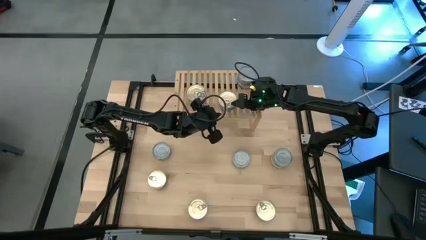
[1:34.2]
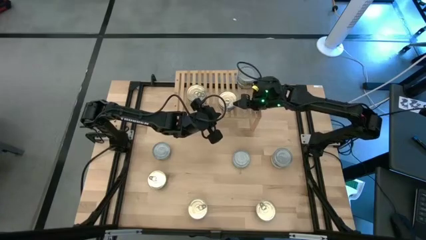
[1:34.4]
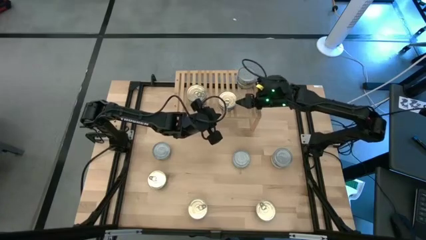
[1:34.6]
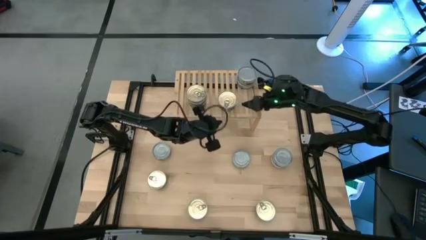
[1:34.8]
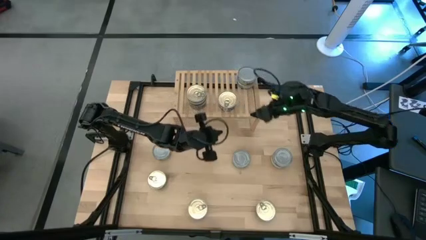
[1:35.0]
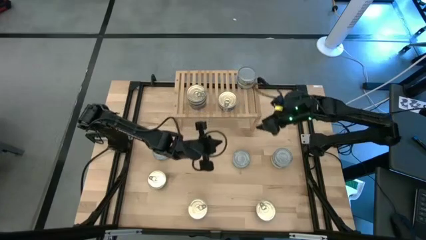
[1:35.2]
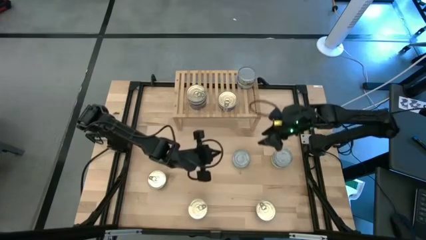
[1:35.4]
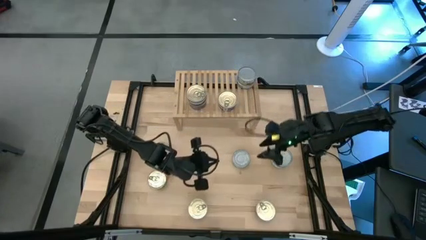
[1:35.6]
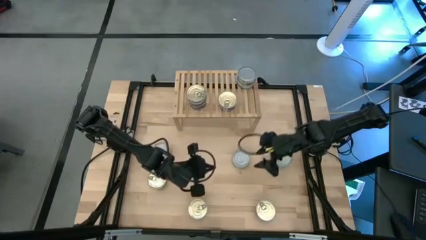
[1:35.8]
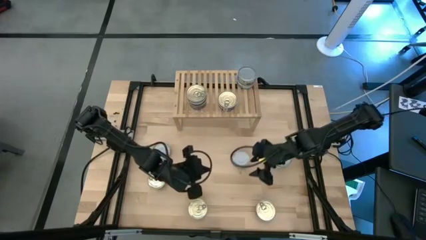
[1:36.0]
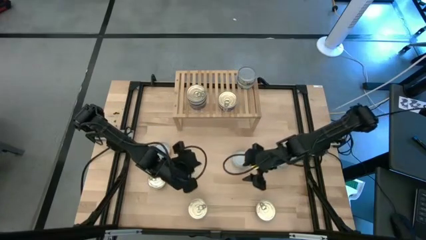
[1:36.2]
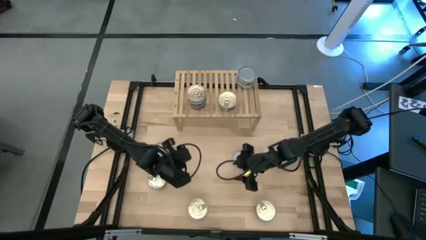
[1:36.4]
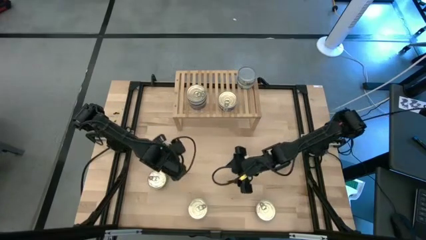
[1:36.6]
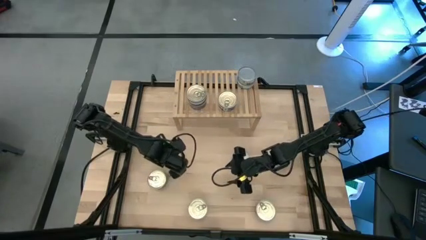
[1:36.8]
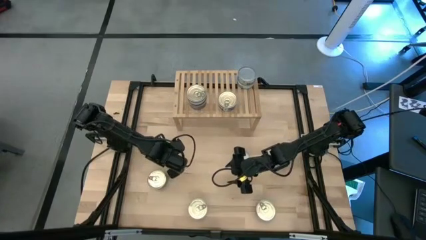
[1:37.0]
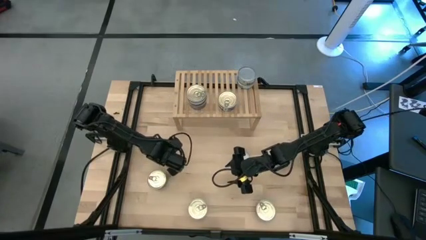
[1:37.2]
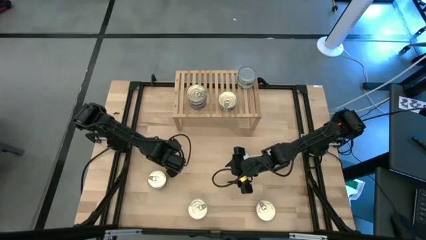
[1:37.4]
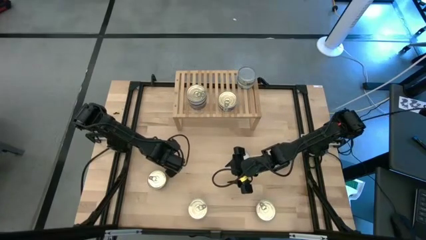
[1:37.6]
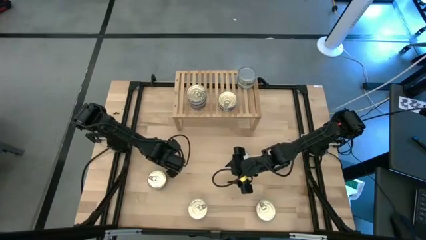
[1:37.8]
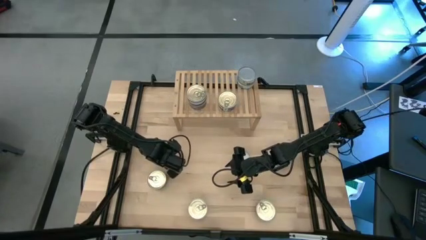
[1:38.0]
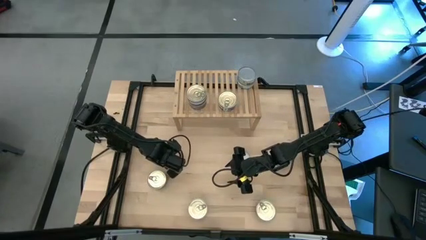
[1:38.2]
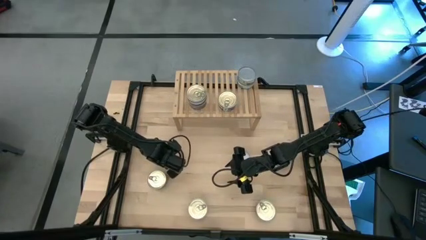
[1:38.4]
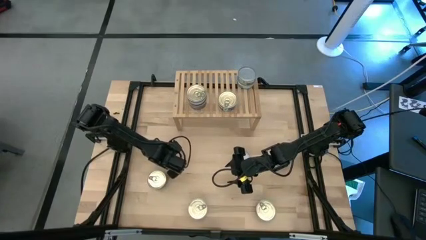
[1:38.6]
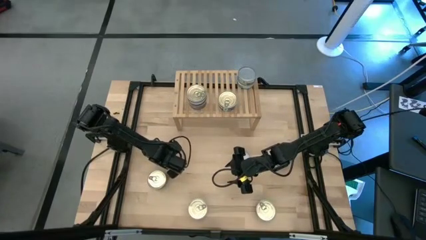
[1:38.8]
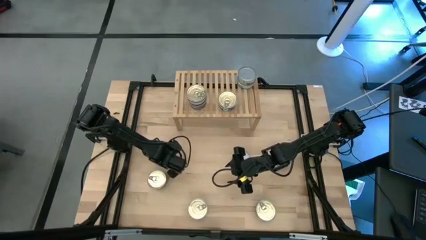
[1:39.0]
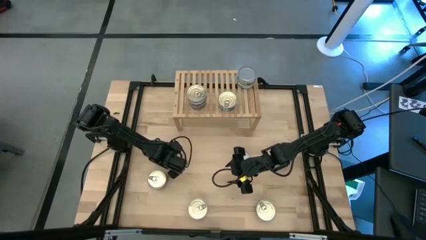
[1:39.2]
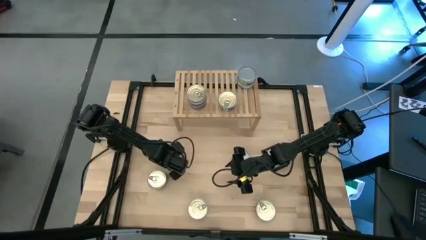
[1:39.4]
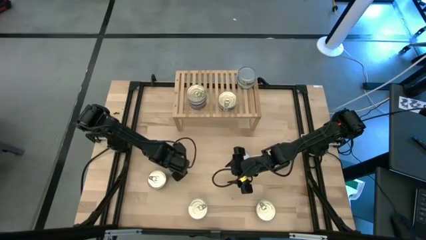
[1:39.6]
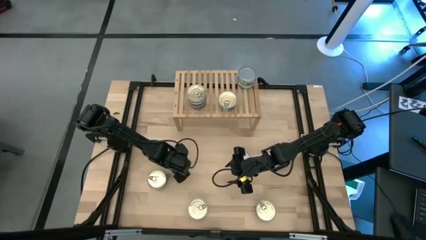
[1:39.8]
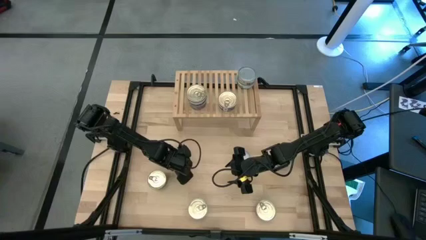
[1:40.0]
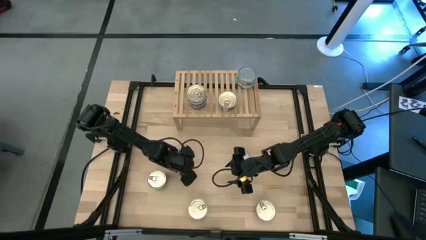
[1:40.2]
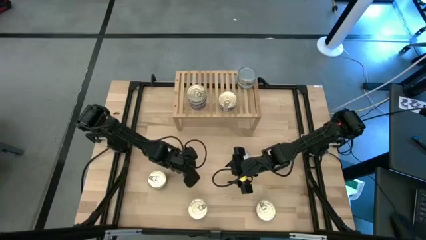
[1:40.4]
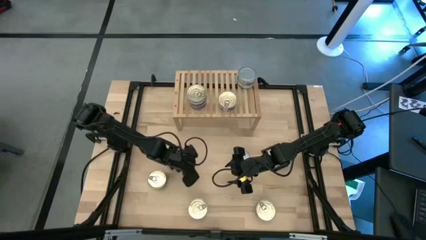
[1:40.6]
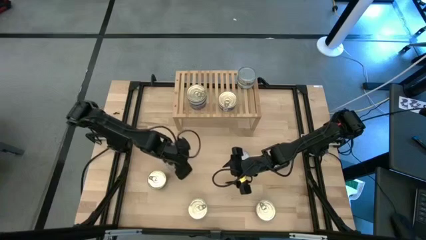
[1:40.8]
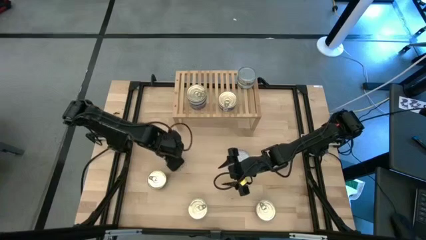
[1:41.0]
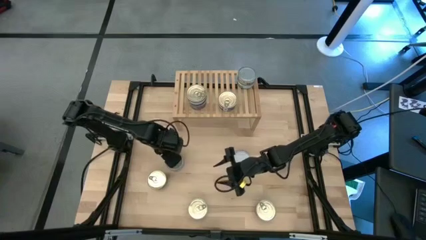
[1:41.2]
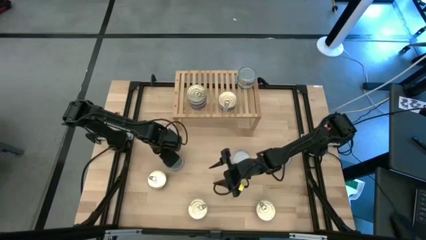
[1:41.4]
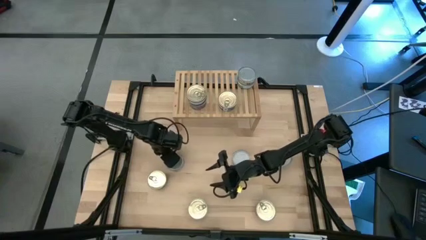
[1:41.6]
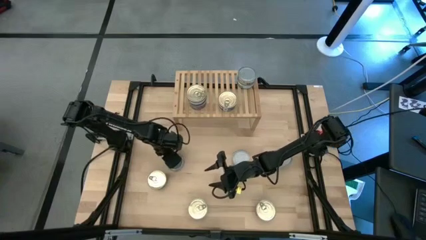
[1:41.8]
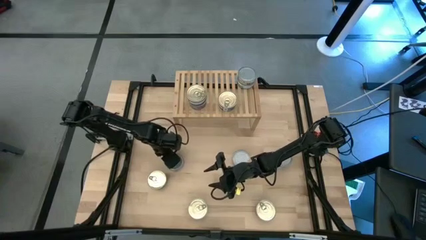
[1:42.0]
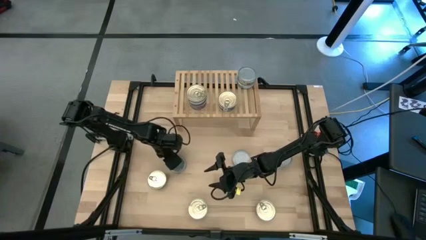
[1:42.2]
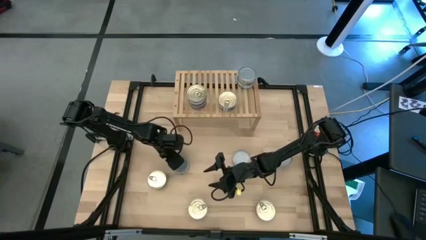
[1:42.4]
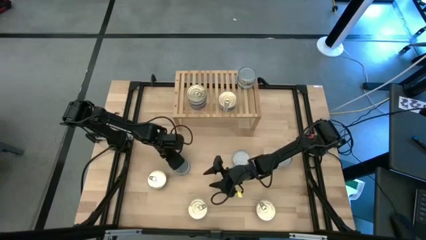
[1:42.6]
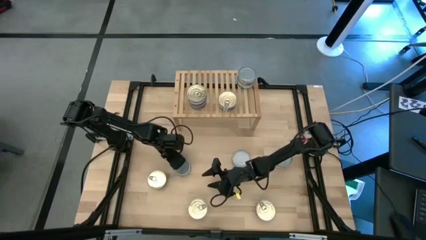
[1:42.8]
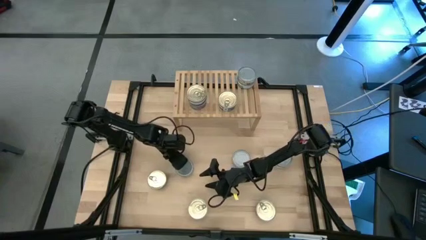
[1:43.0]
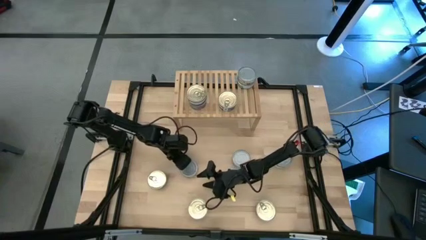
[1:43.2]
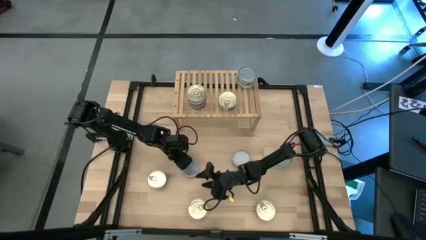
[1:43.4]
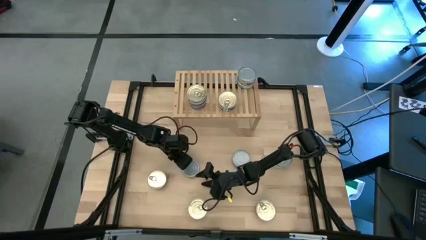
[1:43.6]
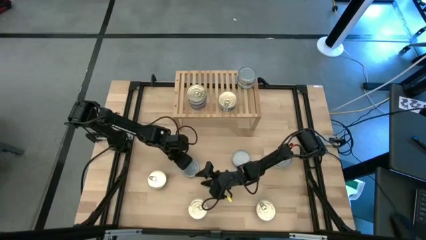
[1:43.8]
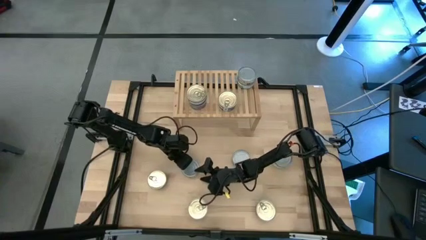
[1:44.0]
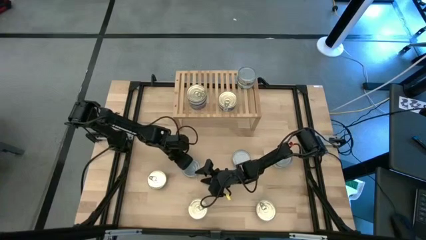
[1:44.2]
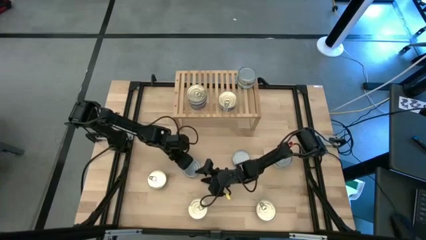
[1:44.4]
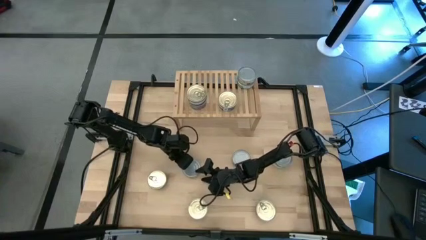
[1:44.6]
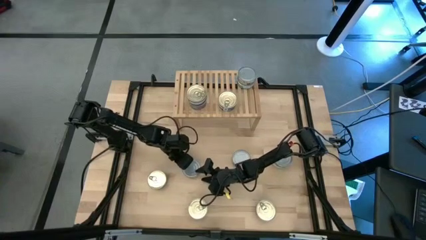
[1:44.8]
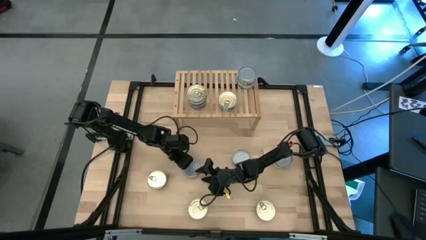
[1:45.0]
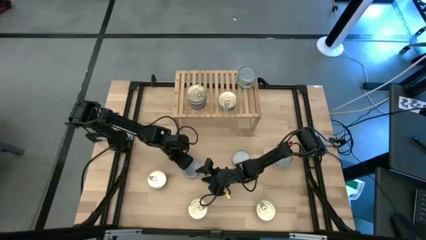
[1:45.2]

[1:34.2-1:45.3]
Task: Stack canned seafood by type on shelf
Stack the green tuna can on top of the green tuna can on the shelf

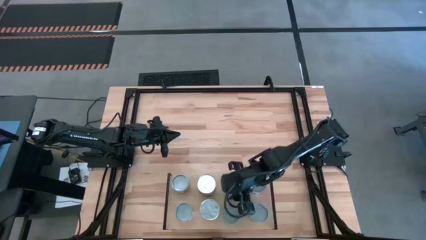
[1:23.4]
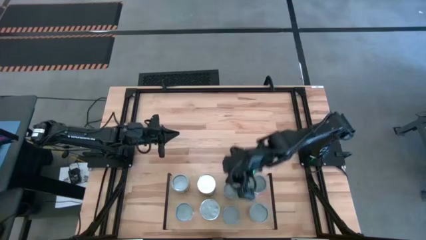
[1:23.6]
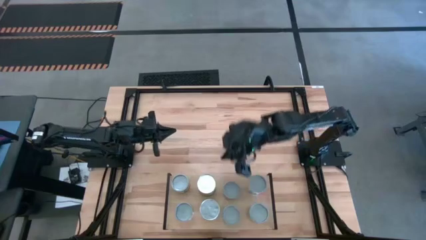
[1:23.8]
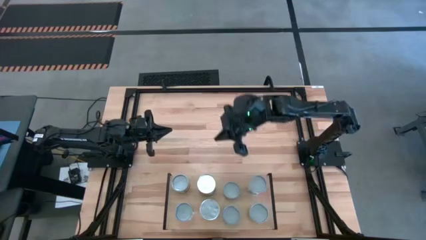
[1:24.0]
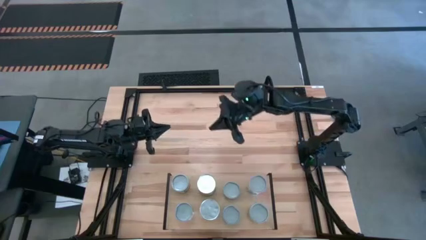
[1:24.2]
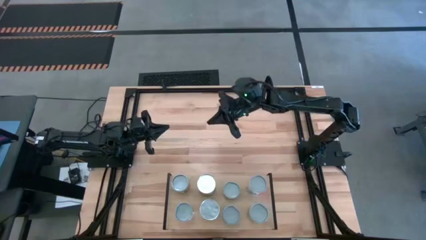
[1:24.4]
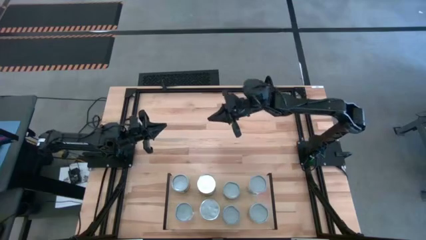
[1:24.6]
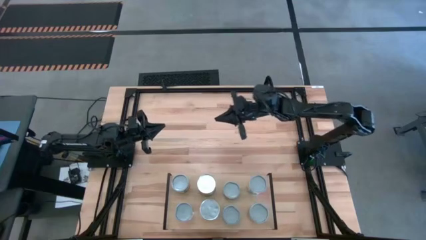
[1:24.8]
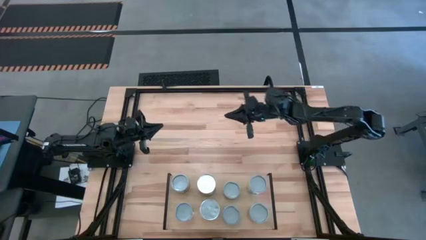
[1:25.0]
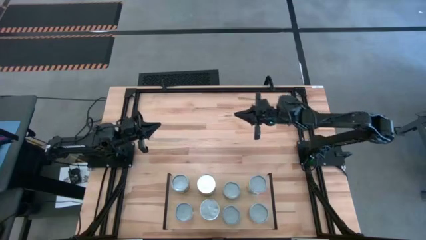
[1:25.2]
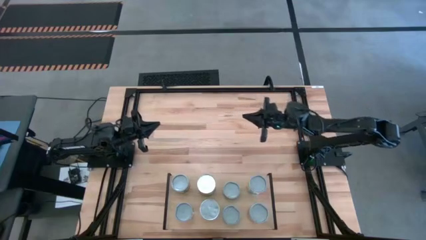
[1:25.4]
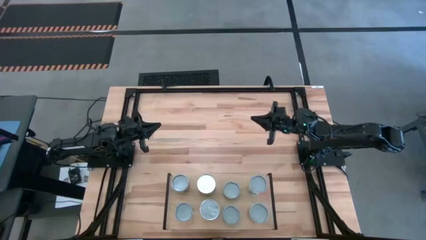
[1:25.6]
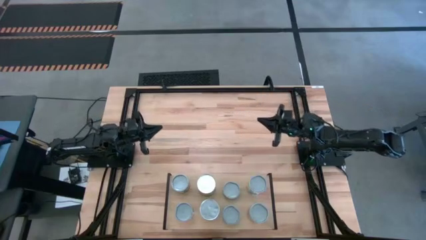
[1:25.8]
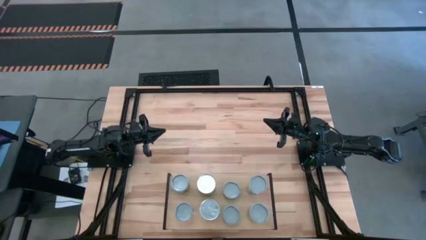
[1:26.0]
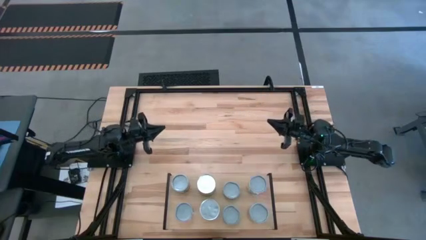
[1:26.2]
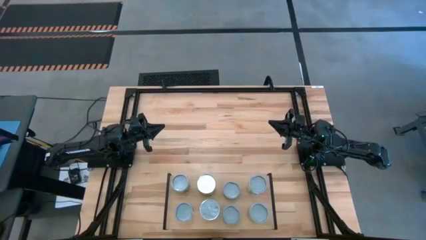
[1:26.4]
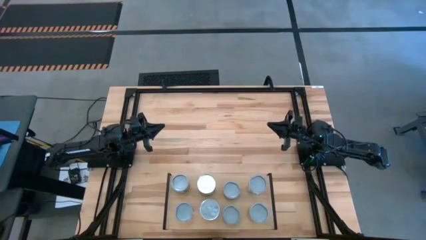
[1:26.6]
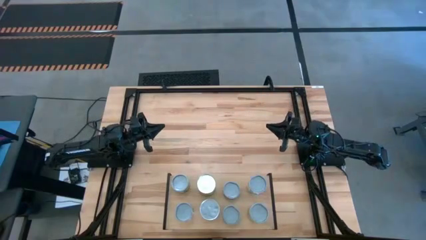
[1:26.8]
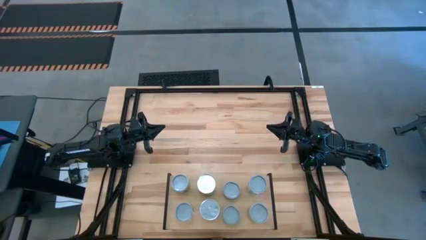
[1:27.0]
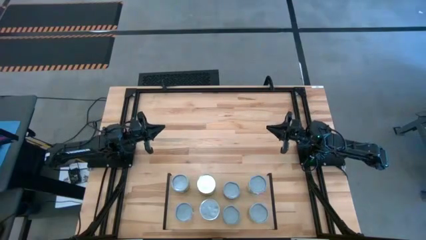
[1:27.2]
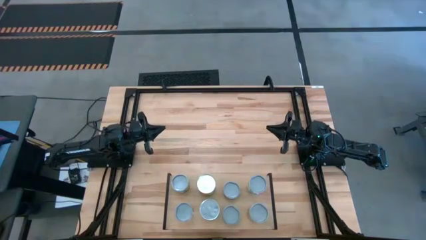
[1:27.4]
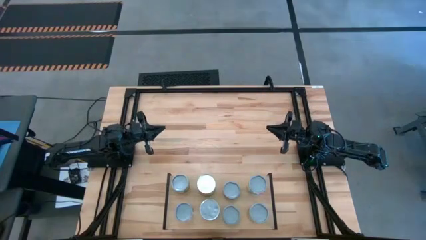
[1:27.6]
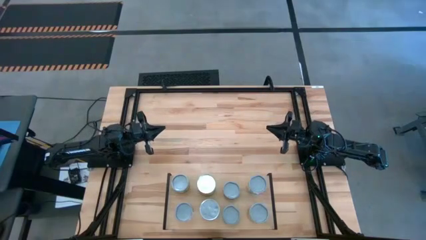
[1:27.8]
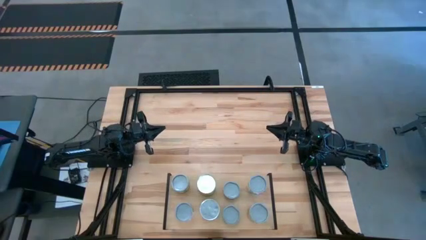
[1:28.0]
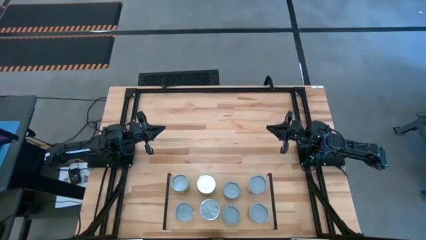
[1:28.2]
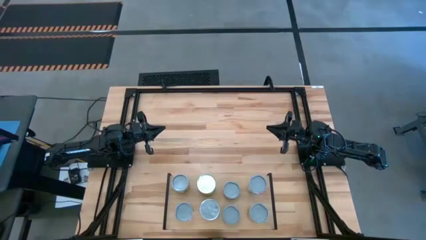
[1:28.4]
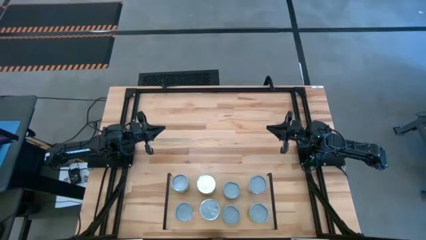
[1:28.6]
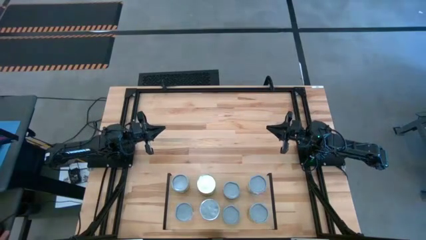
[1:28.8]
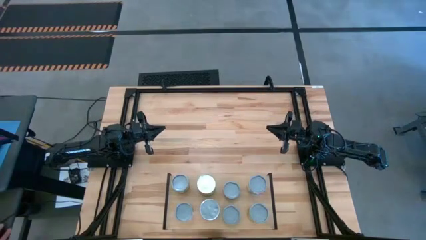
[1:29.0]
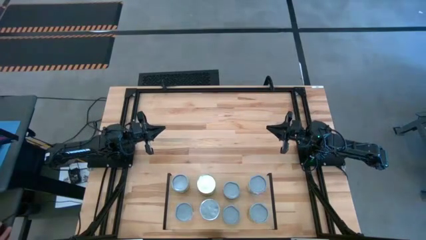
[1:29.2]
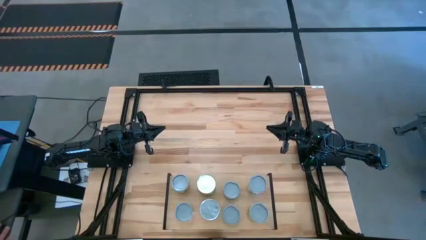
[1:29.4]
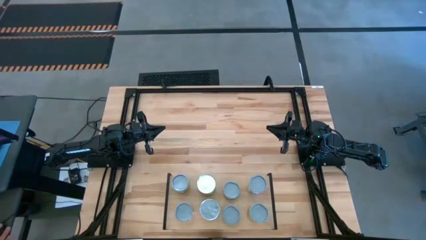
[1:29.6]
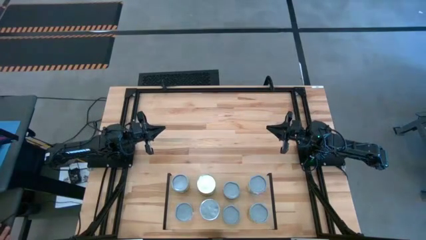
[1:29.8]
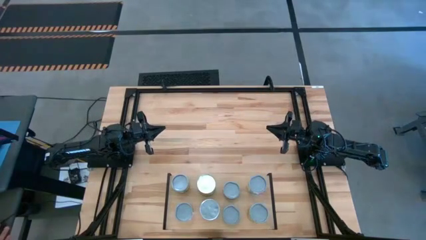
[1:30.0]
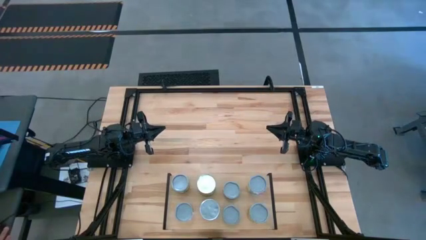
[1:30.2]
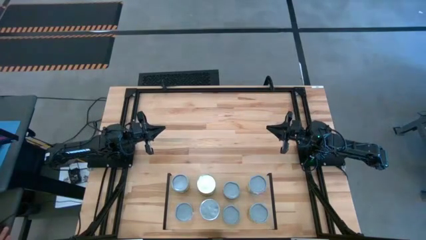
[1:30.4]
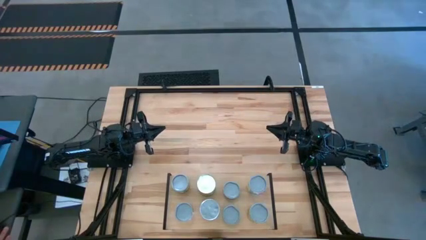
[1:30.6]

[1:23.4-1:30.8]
Task: Pick and place cans onto a shelf
Return to Home Position
